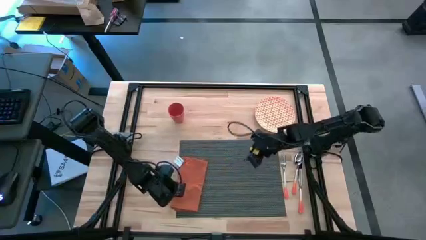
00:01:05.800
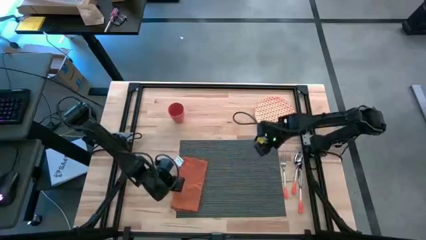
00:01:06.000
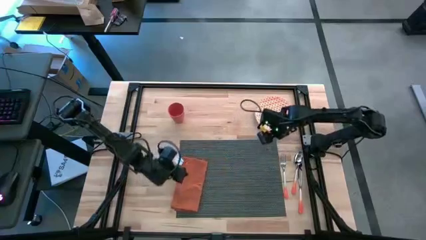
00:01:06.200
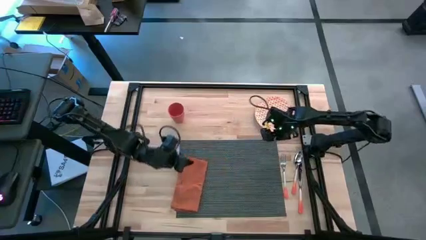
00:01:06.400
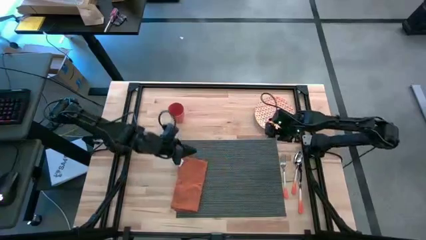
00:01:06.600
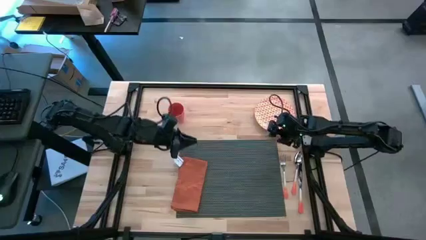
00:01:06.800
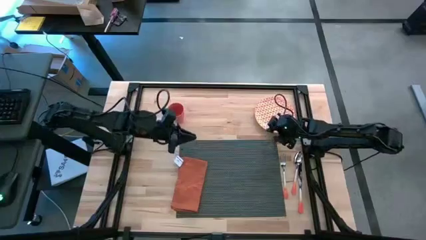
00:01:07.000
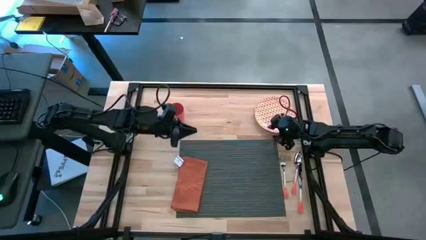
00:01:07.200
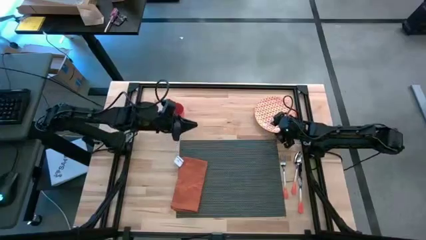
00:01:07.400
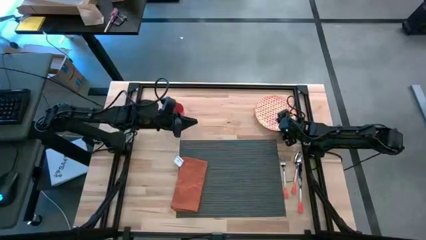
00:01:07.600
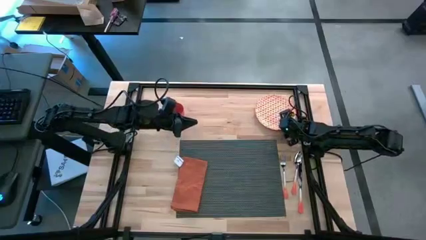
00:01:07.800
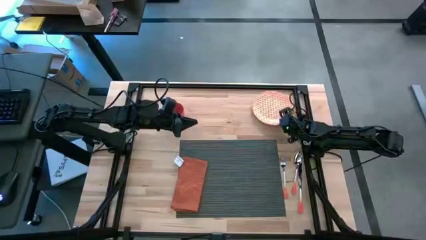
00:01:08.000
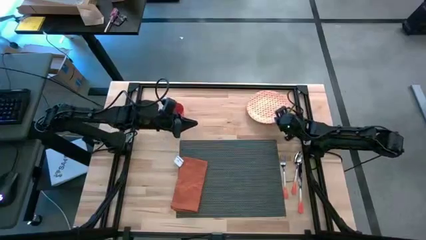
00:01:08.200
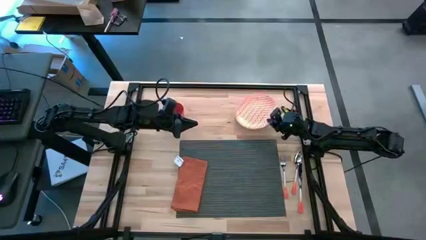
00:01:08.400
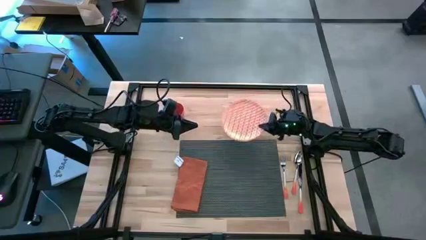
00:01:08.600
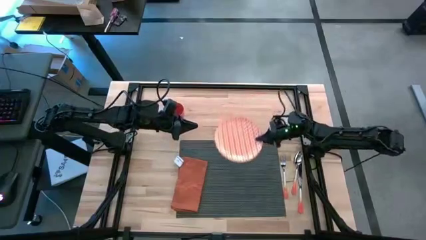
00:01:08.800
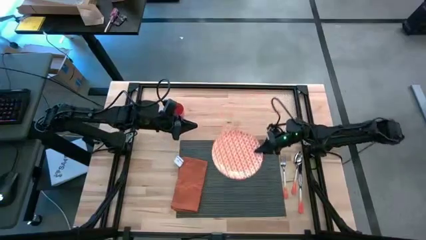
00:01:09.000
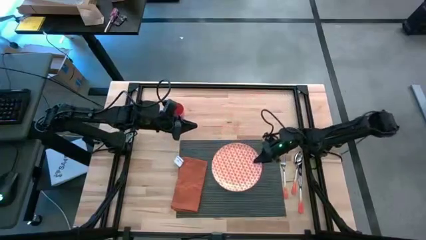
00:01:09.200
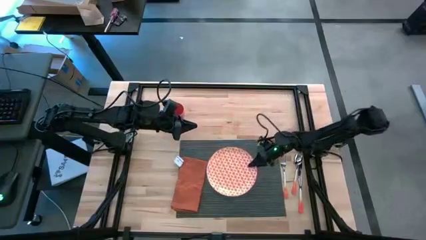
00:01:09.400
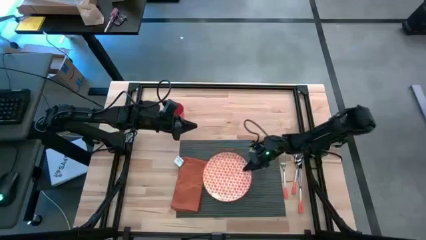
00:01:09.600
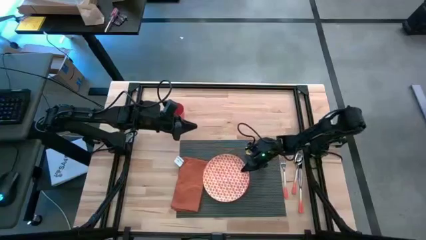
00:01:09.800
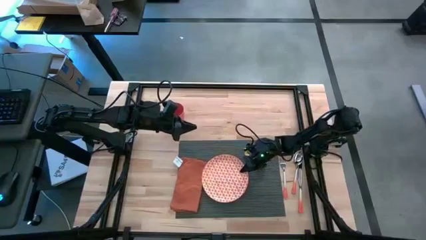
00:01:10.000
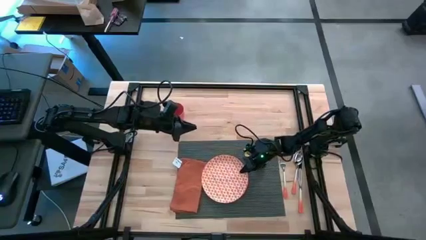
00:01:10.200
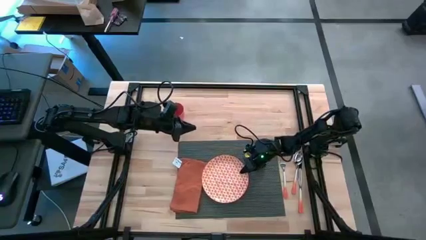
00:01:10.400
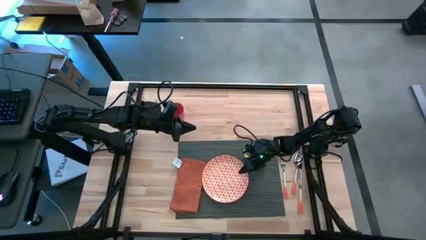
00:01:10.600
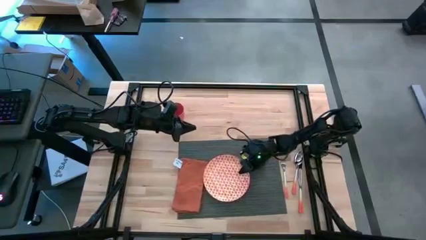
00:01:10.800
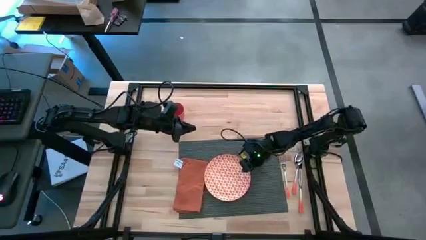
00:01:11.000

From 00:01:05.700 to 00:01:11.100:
Task: Set table place
Put the orange patterned plate on the gray placemat to the right of the orange table napkin

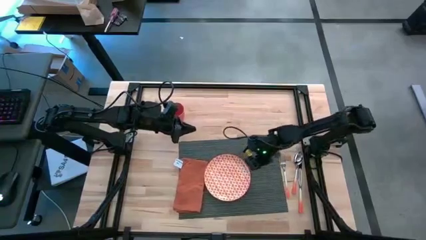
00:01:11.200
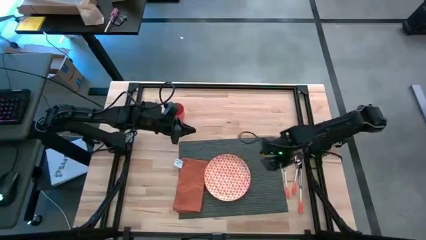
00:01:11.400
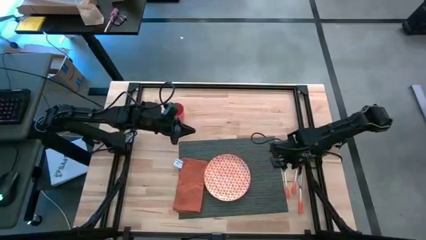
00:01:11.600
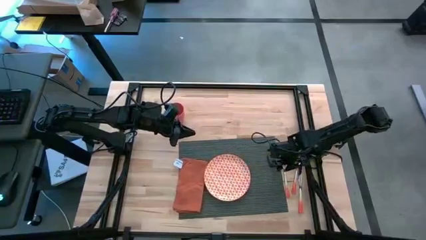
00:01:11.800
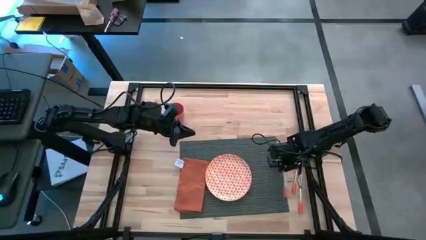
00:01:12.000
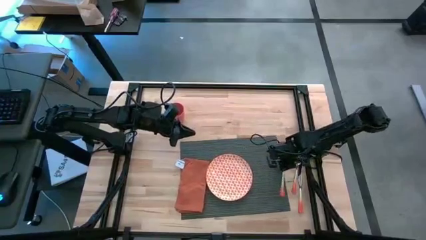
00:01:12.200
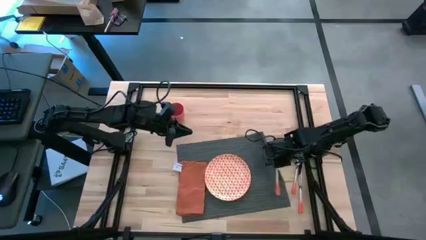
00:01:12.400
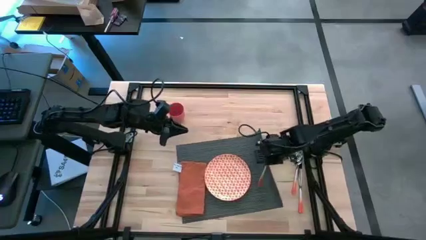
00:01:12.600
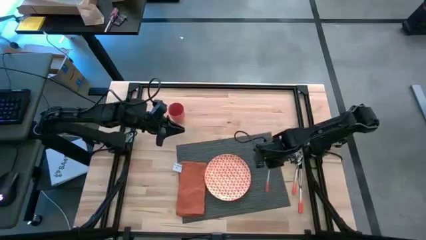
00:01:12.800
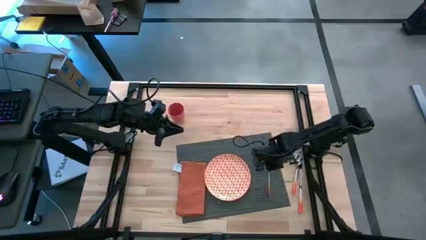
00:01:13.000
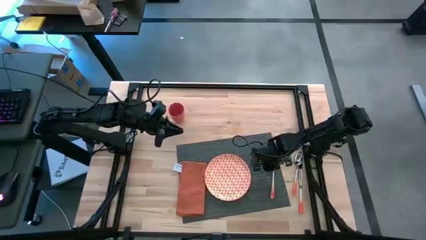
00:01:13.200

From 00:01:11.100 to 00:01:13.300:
Put the orange fork on the orange table napkin

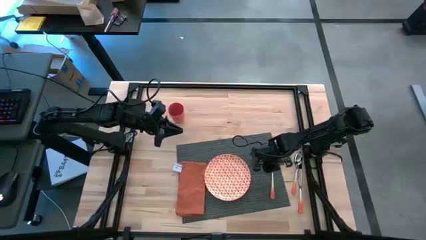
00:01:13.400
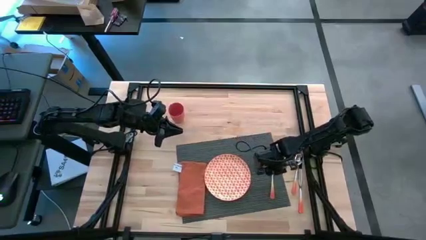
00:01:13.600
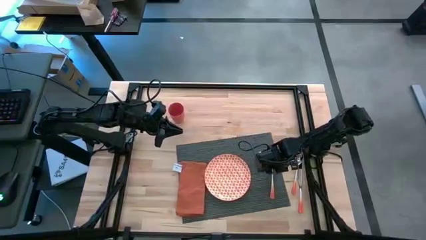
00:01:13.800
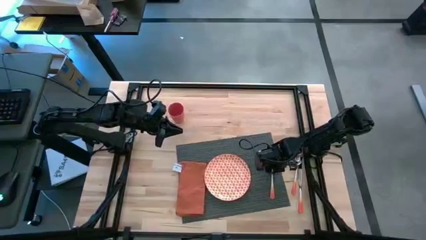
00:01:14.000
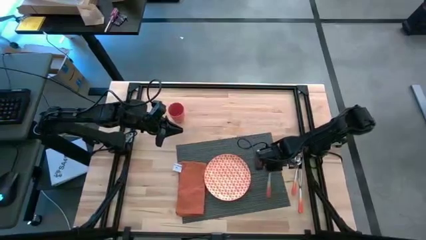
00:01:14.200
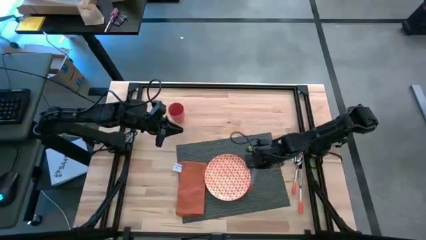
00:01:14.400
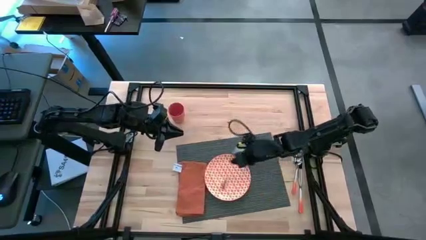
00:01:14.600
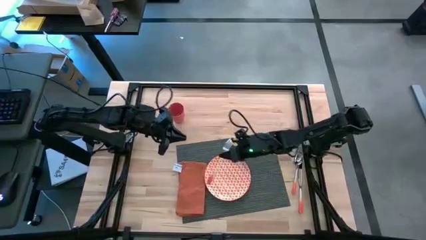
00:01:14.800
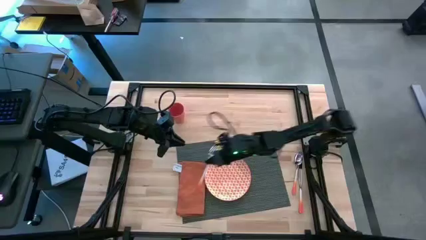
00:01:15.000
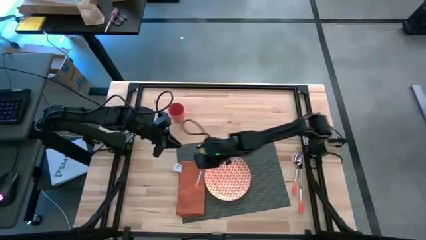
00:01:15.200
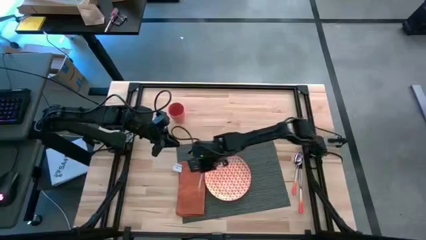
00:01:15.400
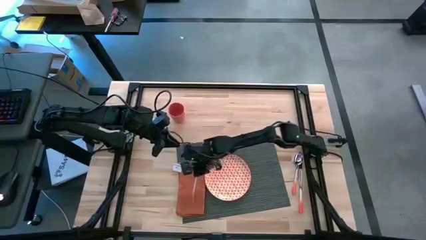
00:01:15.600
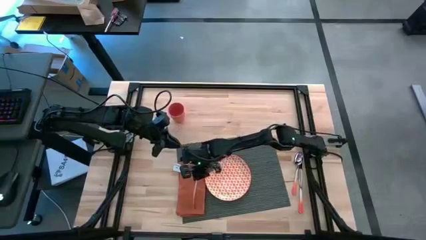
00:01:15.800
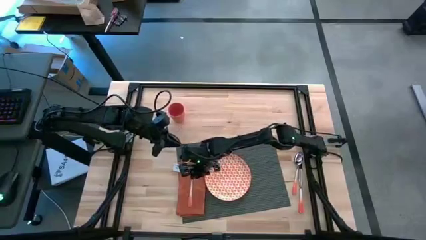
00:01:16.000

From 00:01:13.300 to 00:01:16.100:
Put the orange fork on the orange table napkin

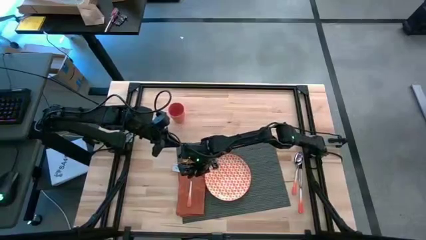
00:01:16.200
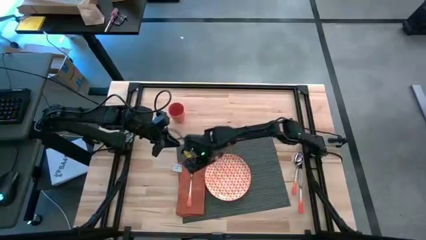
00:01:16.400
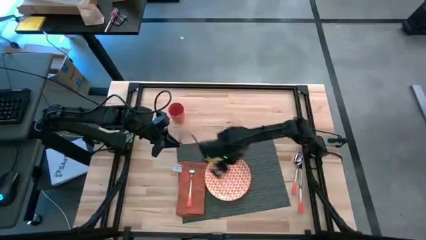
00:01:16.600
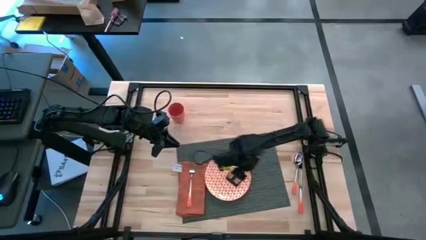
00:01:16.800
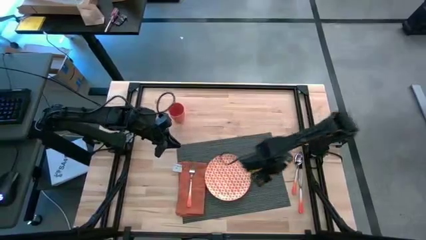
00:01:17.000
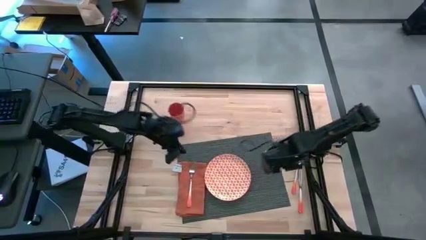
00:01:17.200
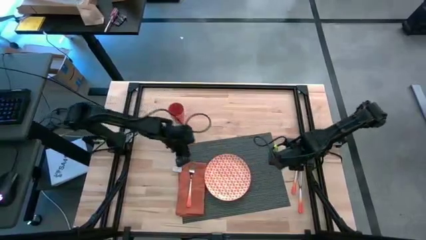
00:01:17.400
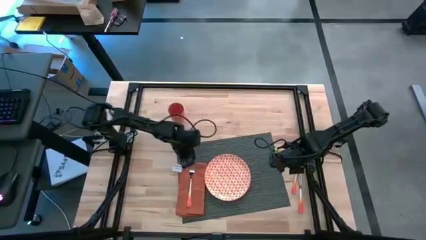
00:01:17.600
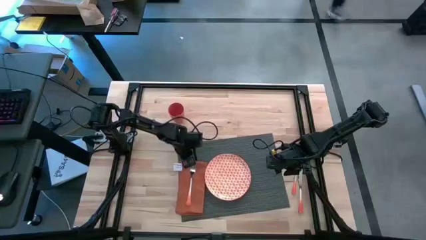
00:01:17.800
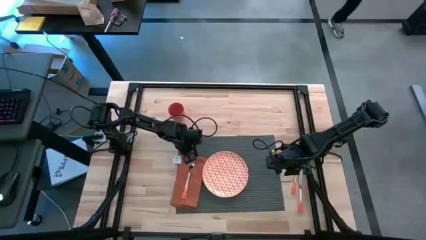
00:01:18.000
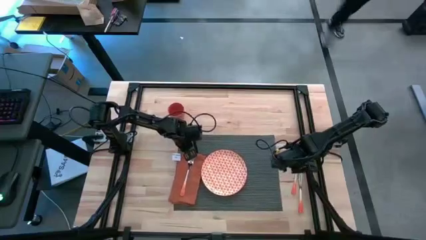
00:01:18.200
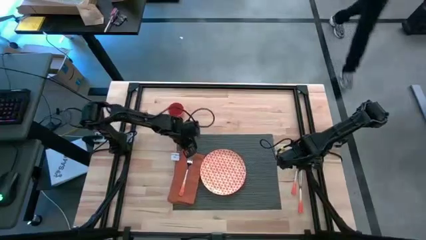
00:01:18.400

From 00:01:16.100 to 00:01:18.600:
Adjust the gray placemat

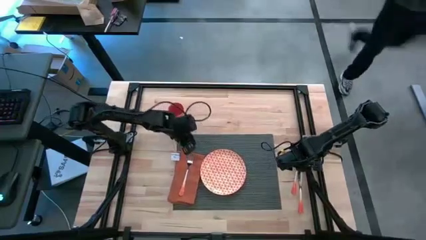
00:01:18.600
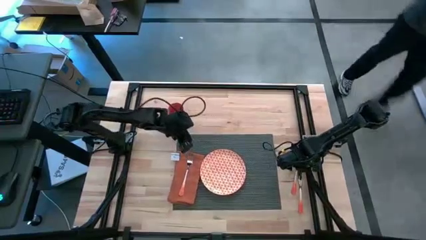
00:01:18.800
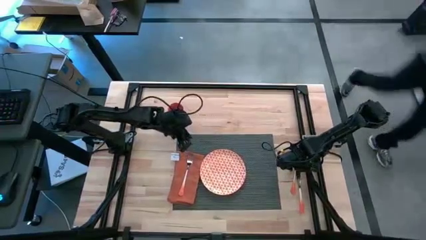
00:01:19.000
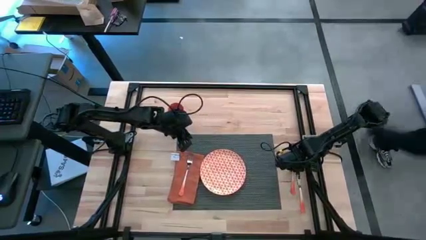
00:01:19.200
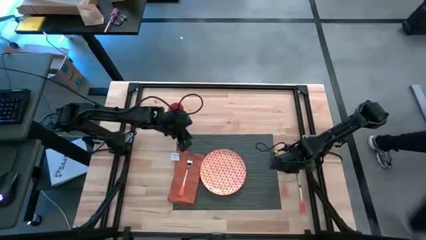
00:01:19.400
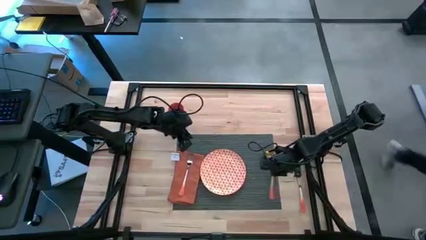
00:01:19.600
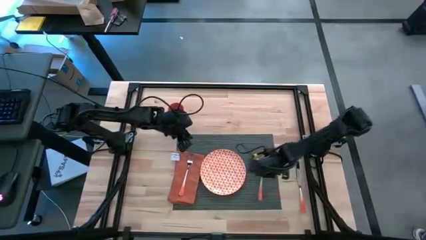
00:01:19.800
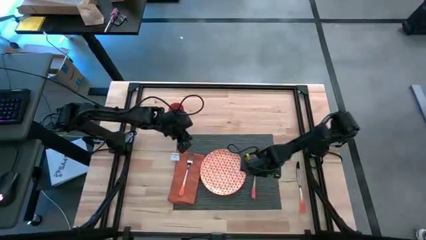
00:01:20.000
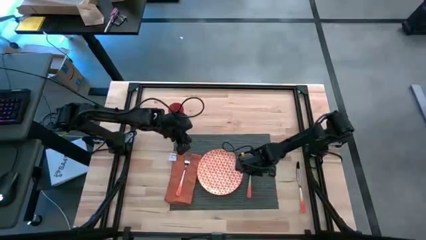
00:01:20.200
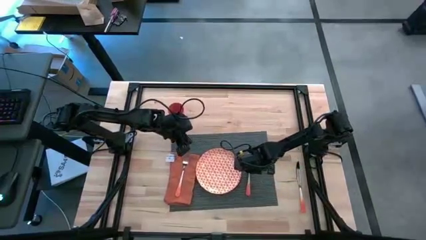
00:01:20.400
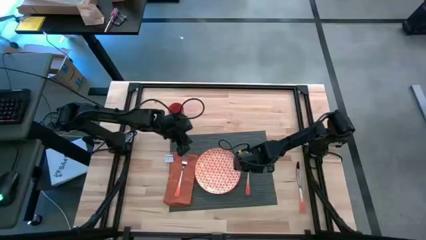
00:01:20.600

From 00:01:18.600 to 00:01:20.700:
Put the orange spoon on the gray placemat to the right of the orange patterned plate

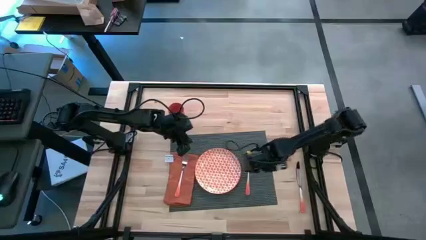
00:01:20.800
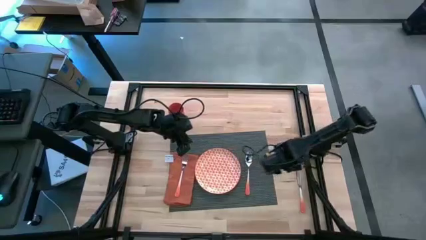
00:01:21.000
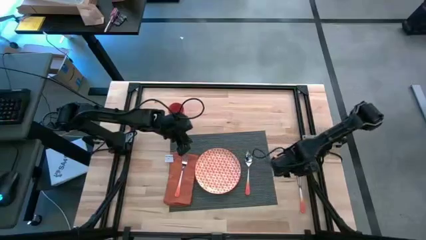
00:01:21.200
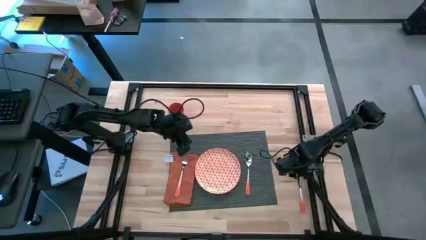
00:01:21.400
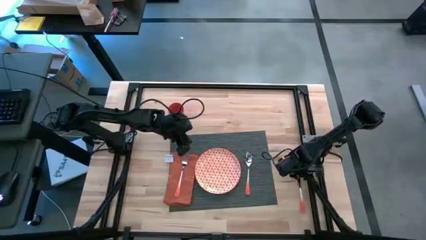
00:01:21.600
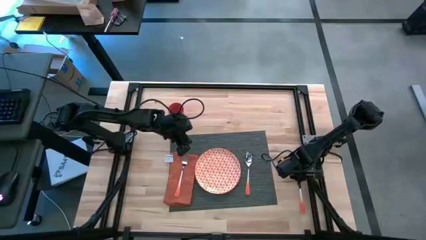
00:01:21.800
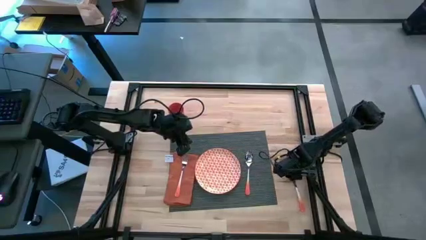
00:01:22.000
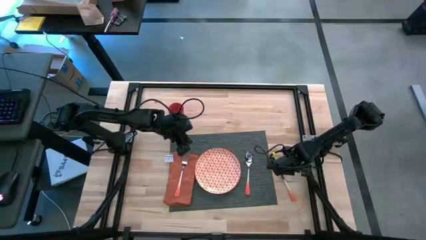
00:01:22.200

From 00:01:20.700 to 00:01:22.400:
Put the orange table knife on the gray placemat to the right of the orange spoon

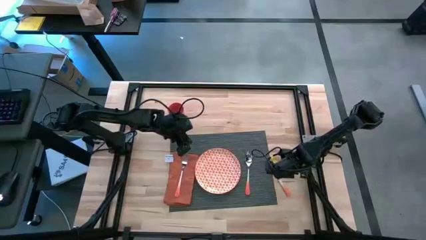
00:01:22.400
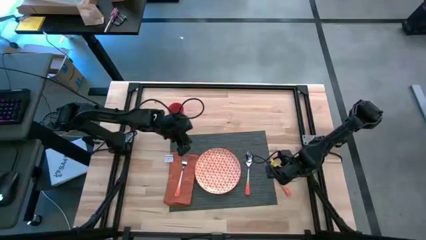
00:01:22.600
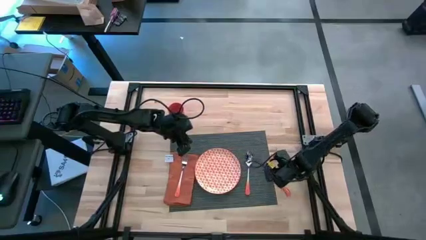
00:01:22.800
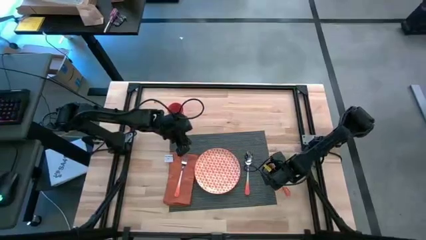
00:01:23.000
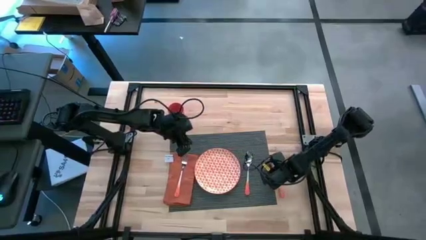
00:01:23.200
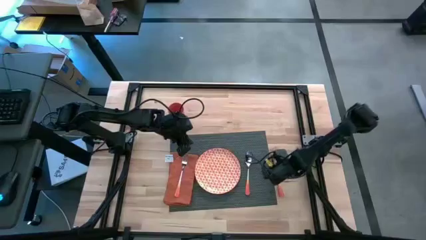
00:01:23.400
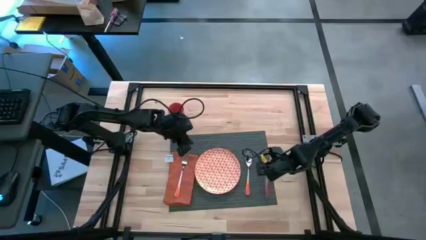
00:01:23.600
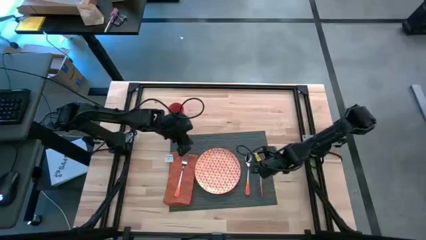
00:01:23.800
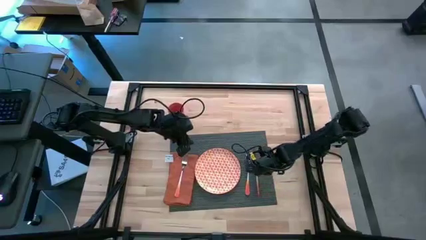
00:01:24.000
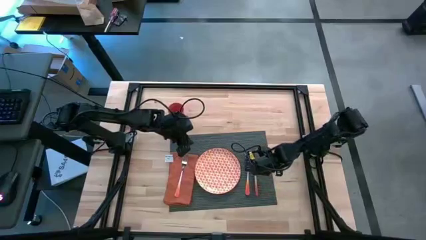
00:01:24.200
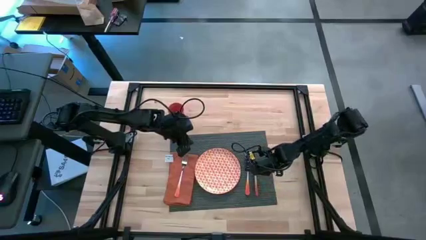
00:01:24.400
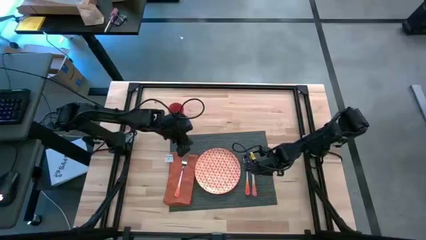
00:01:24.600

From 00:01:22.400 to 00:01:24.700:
Put the orange table knife on the gray placemat to the right of the orange spoon
